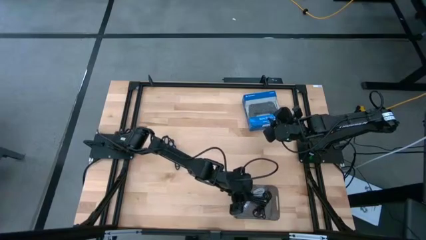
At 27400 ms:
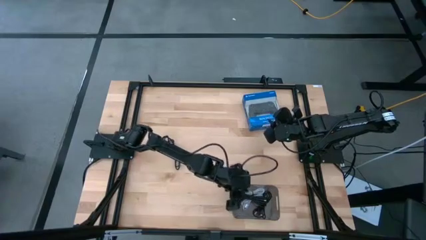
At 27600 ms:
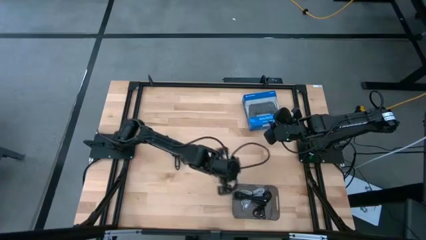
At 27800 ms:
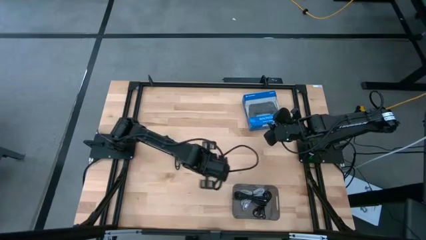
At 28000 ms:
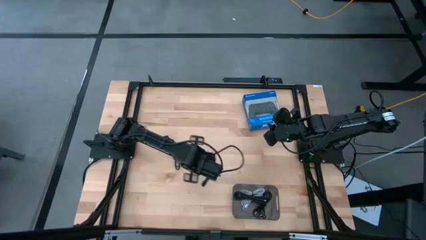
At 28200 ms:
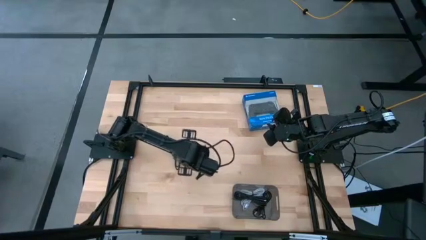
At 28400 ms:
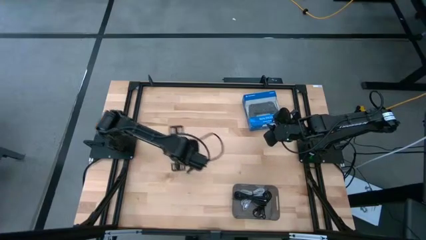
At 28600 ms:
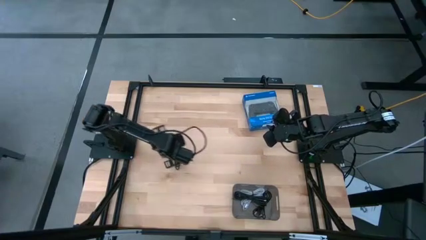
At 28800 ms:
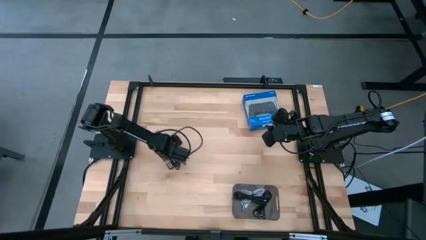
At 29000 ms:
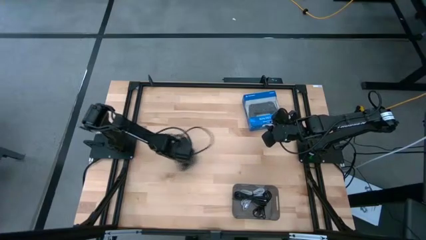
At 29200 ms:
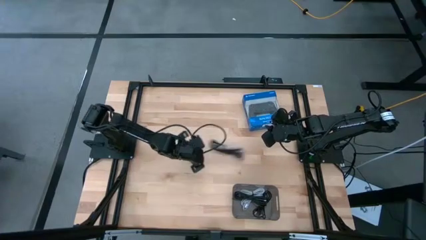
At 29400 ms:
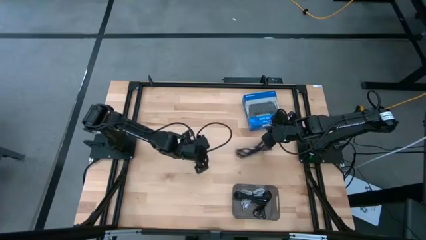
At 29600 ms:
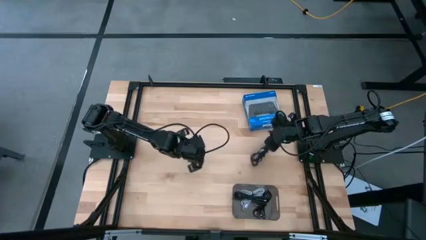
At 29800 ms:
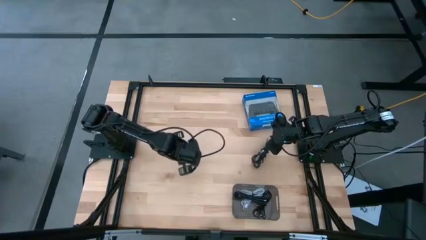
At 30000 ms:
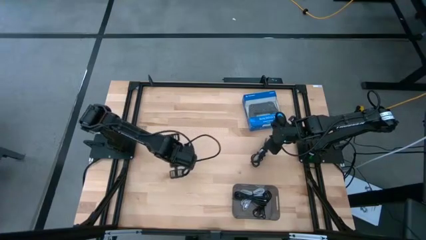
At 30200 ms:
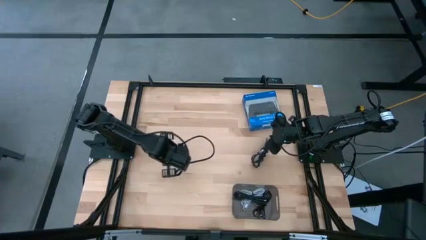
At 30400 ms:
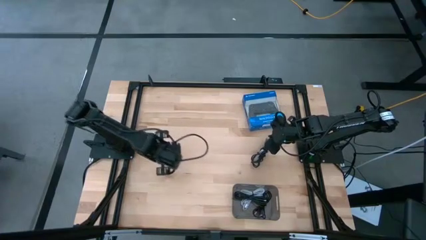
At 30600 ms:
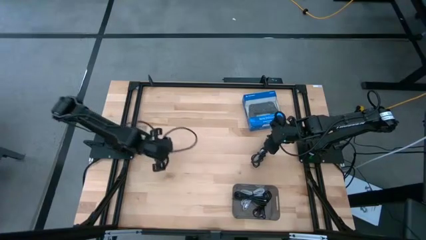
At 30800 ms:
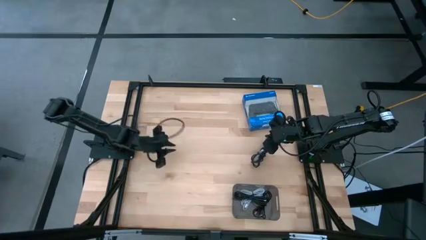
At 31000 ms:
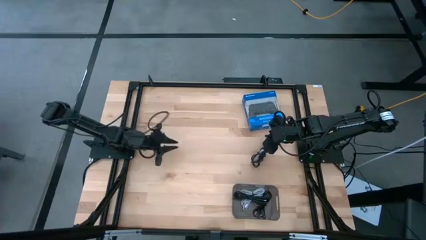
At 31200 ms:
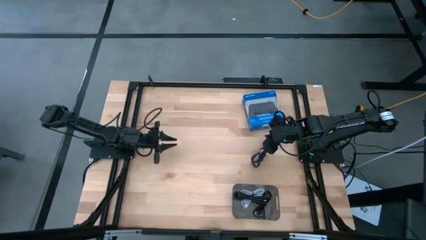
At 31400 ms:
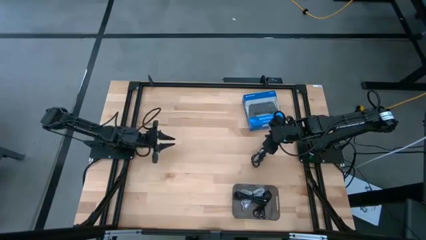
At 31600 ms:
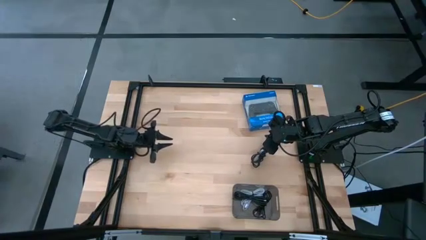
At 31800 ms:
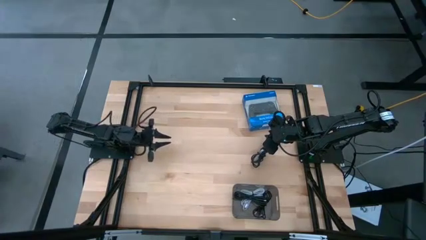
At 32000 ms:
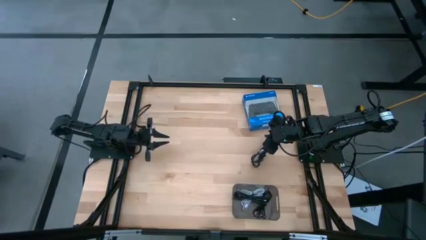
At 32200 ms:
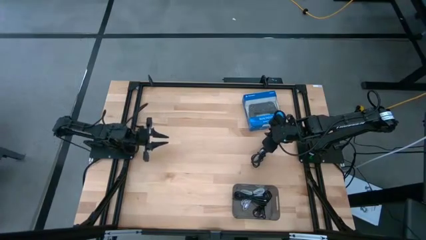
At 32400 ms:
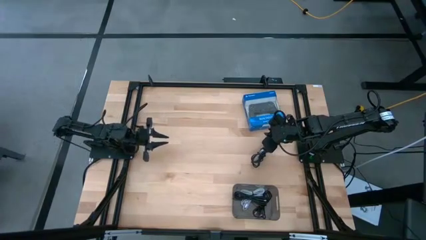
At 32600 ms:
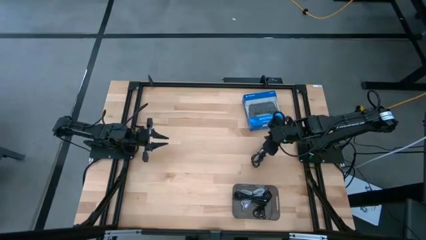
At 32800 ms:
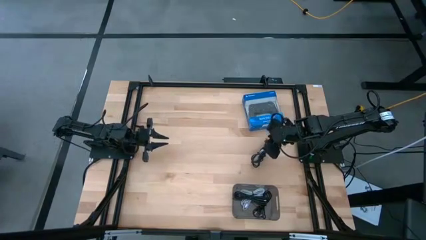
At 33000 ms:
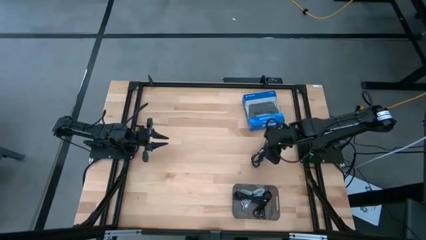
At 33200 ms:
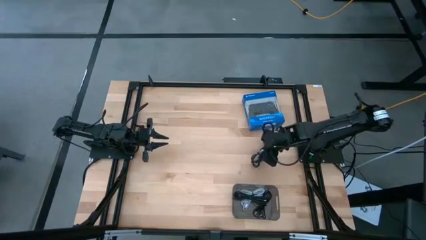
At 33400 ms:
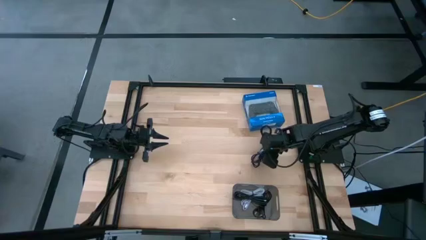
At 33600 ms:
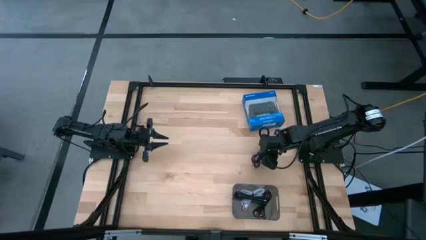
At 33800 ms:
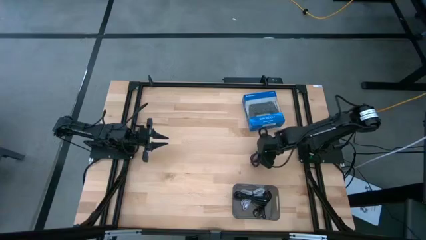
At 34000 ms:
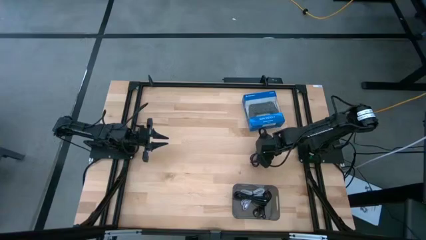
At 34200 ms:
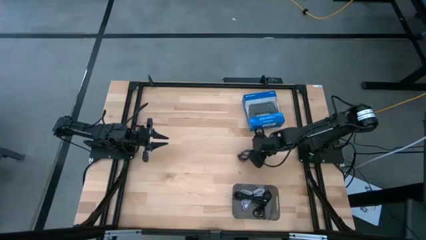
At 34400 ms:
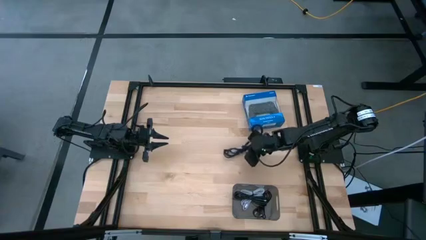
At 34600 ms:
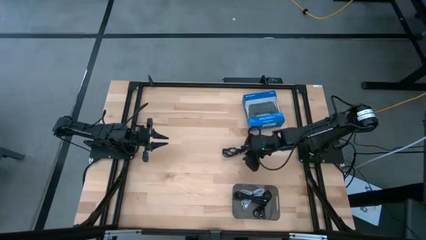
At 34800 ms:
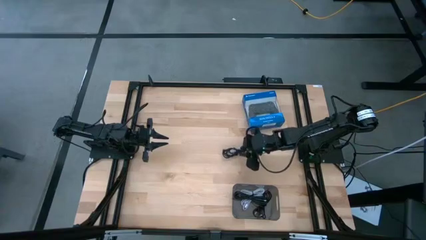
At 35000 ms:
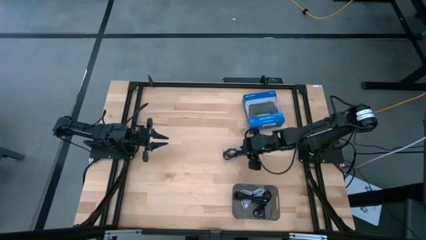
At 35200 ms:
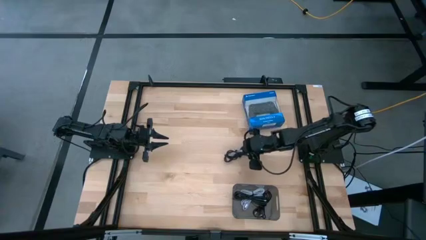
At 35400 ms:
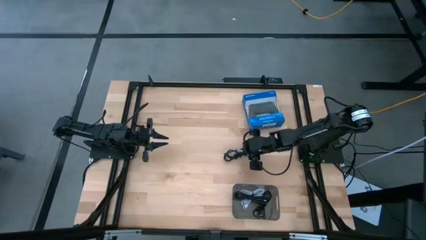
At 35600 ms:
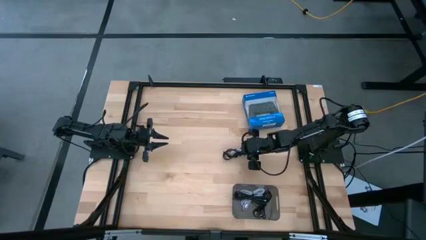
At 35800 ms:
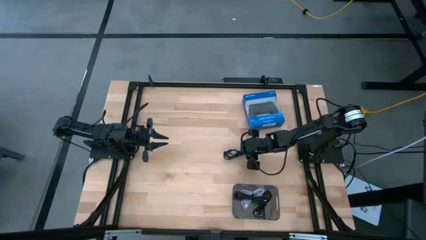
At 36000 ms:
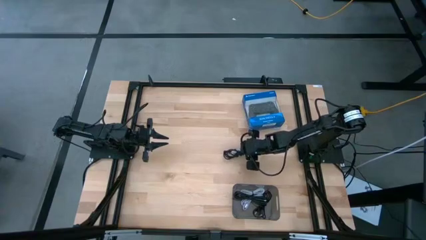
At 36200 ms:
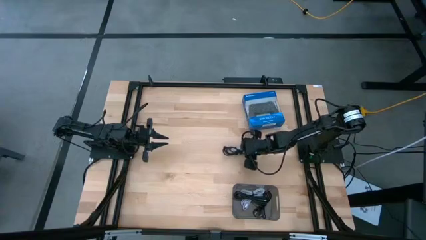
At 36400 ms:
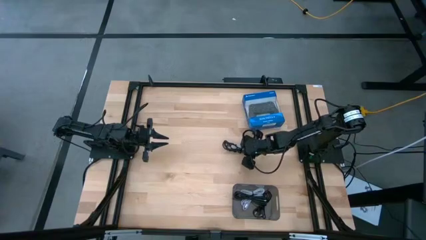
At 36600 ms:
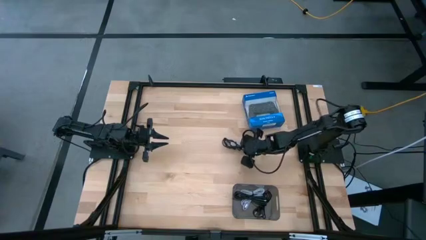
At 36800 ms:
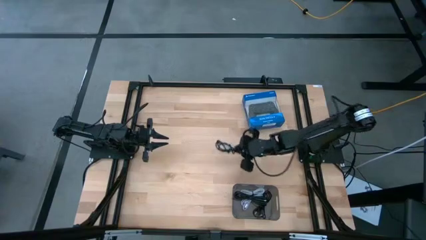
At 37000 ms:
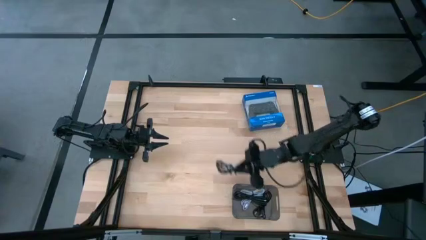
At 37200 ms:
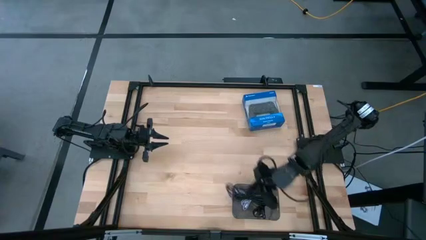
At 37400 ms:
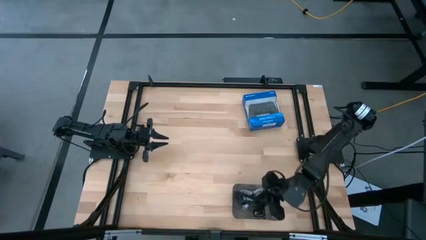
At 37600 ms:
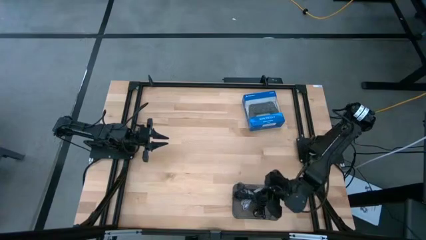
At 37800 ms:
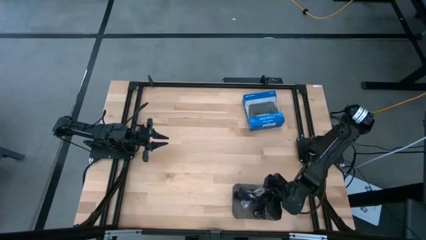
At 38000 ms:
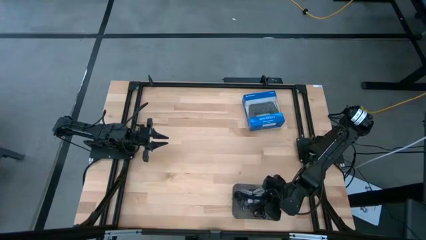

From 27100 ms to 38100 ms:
Task: Pick and place USB-C Cables
Put the black charger into the black bin

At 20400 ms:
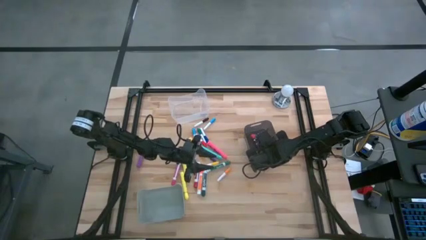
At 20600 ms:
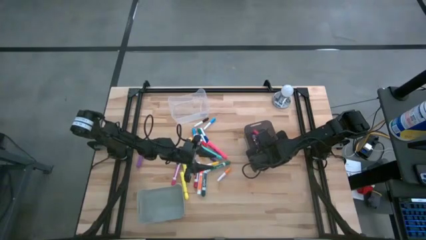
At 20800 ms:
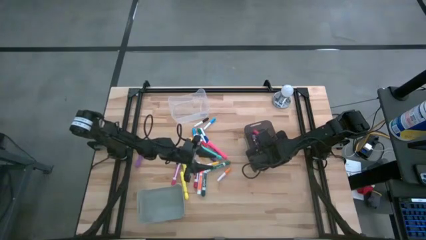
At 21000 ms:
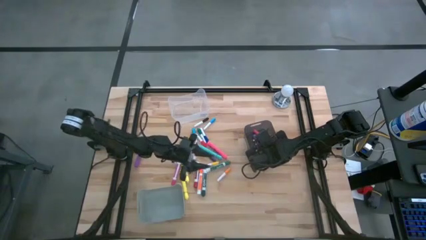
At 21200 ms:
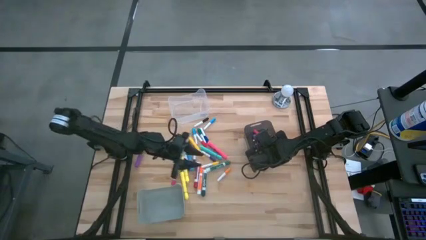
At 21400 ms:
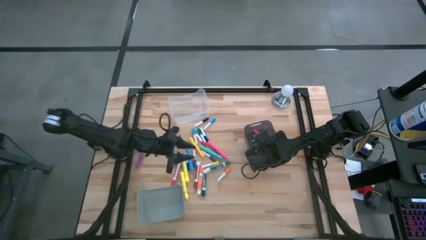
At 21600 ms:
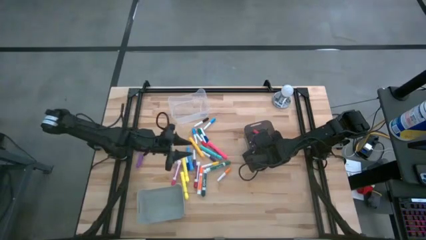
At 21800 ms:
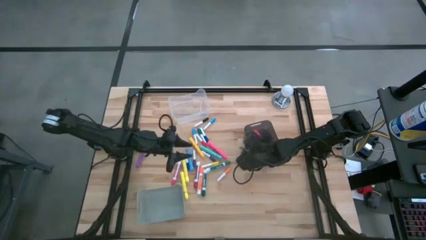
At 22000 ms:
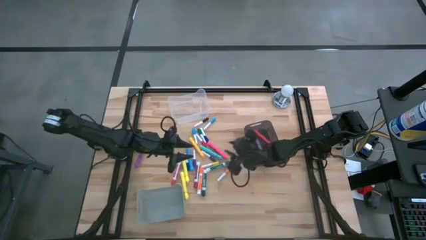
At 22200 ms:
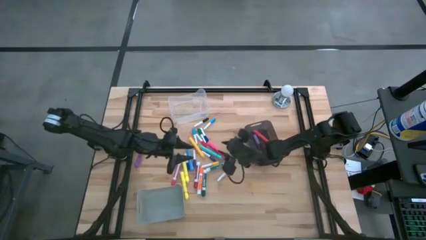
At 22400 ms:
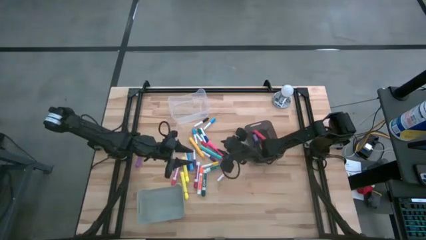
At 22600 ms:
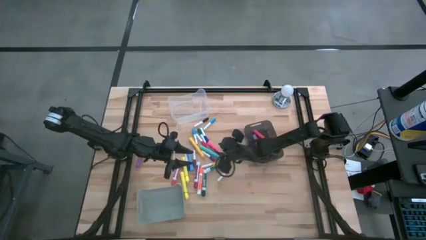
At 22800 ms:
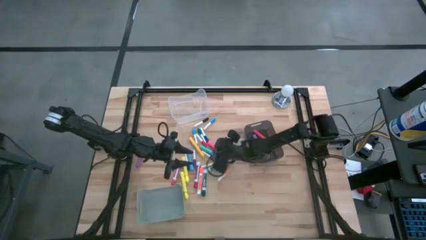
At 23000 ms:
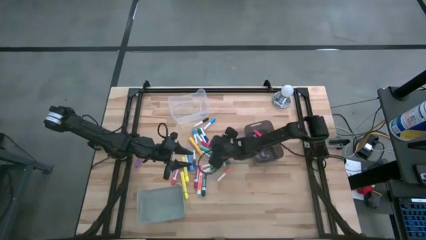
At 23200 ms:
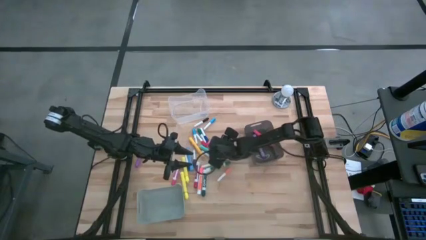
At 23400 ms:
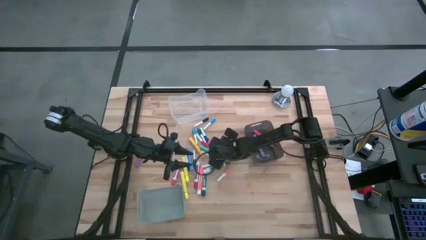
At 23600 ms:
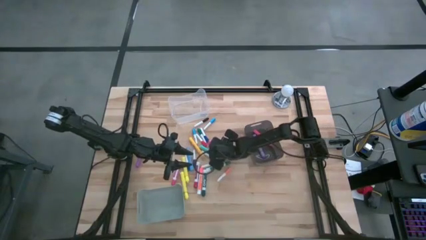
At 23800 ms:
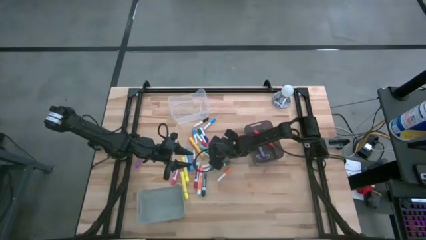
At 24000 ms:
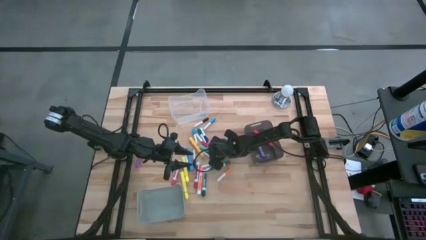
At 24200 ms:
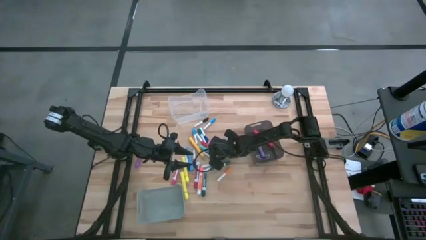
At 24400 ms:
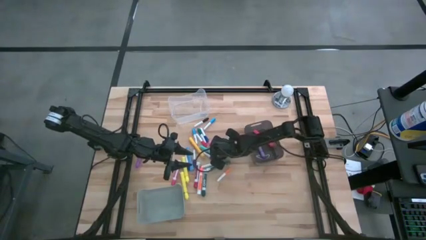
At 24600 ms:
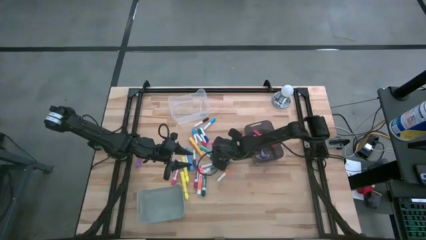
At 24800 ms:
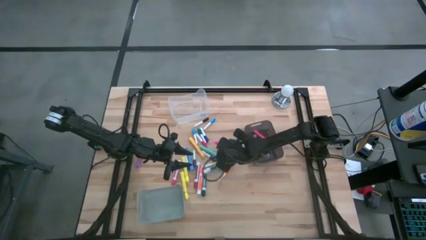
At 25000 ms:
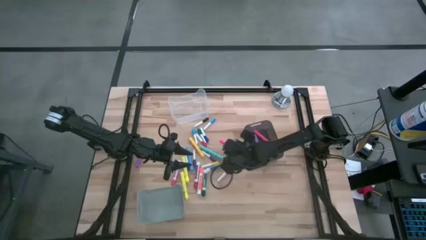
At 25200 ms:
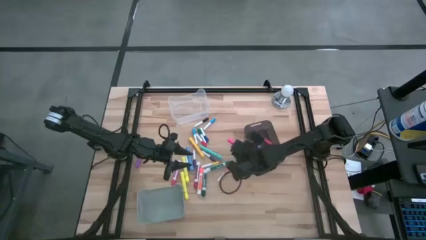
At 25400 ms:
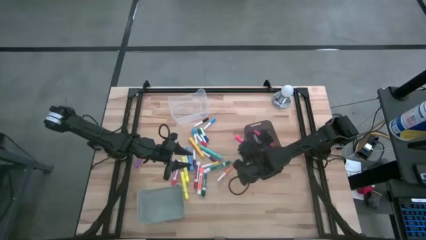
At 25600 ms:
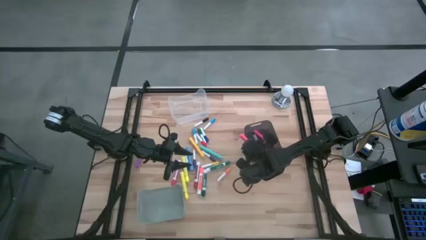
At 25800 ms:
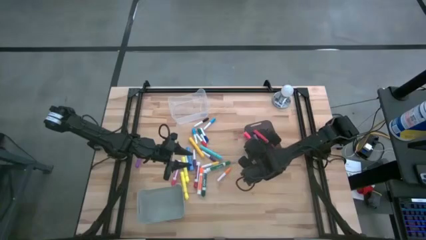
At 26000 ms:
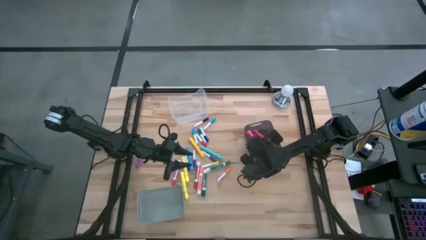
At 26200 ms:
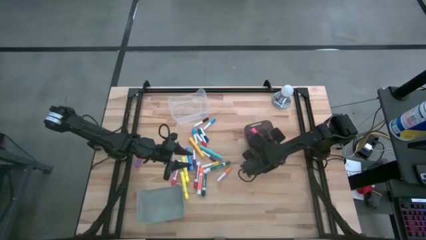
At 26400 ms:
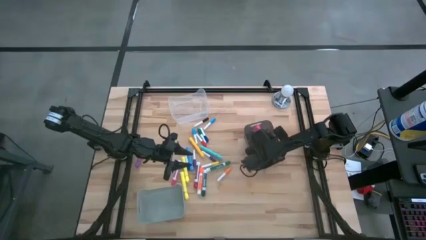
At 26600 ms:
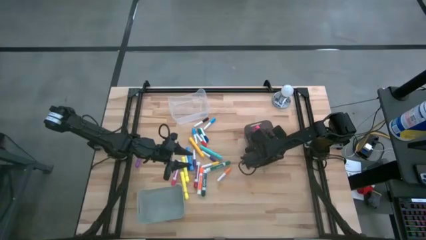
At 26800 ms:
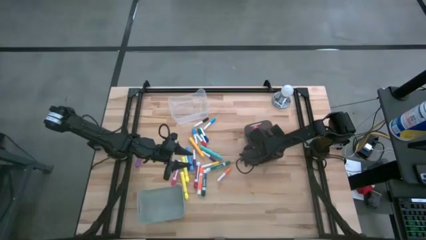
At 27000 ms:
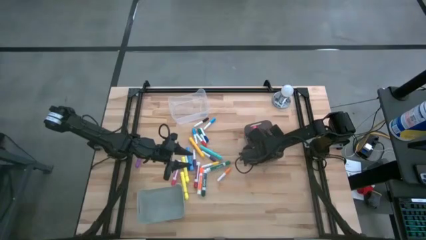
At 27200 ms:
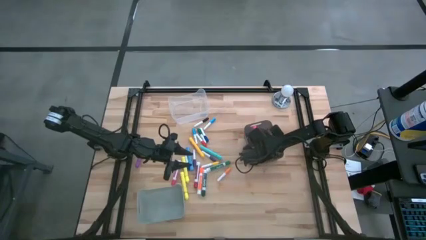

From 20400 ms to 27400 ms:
Task: Pick & Place Markers
Put the pink highlighter pen into the black bin
